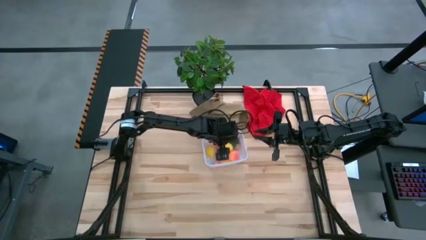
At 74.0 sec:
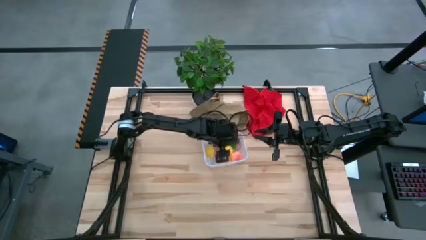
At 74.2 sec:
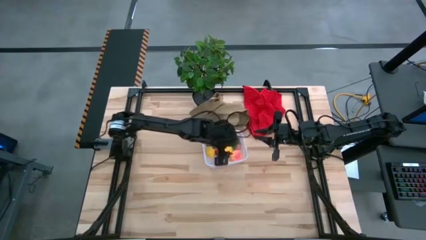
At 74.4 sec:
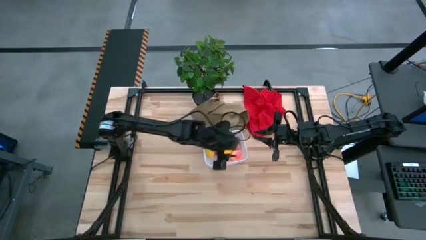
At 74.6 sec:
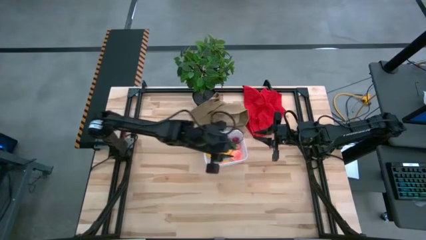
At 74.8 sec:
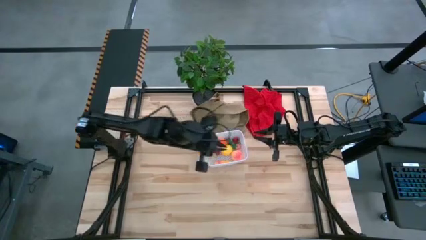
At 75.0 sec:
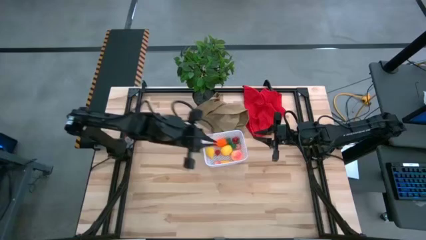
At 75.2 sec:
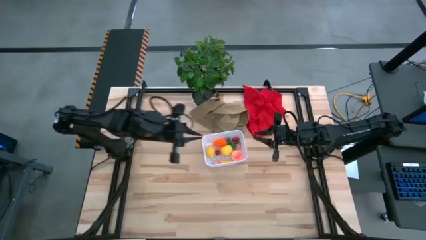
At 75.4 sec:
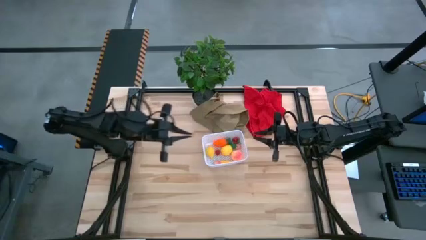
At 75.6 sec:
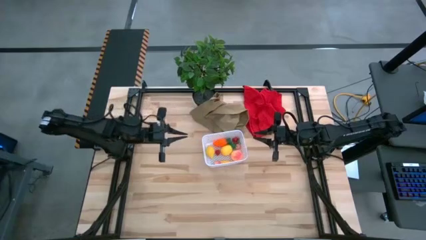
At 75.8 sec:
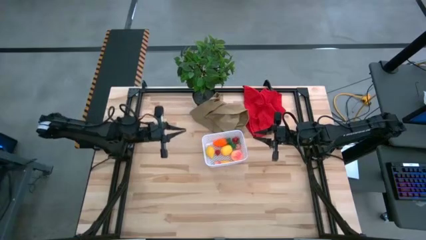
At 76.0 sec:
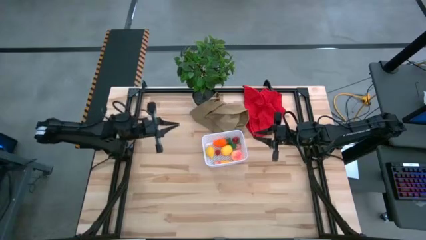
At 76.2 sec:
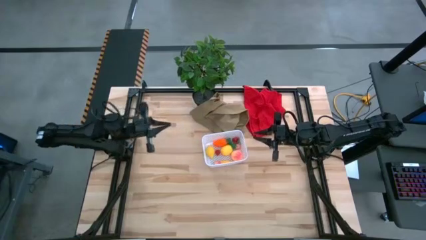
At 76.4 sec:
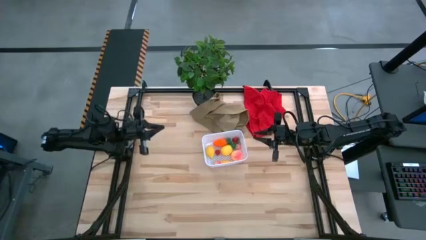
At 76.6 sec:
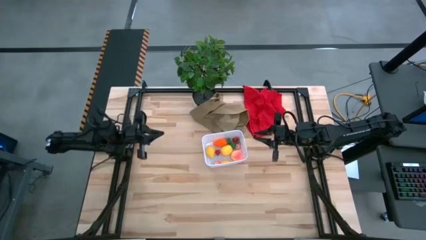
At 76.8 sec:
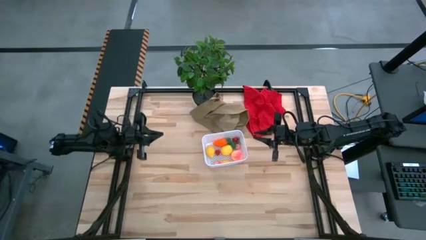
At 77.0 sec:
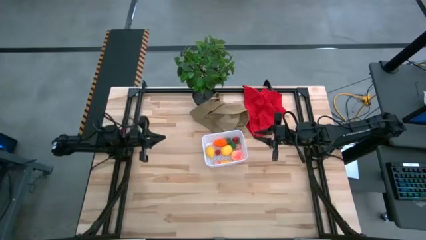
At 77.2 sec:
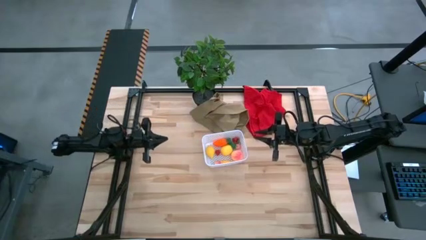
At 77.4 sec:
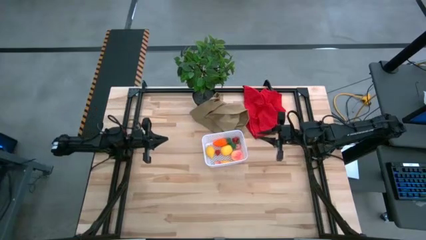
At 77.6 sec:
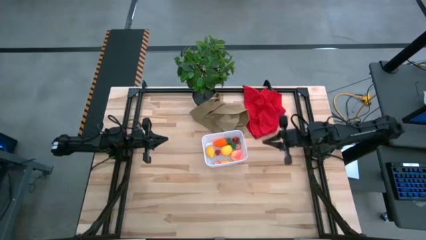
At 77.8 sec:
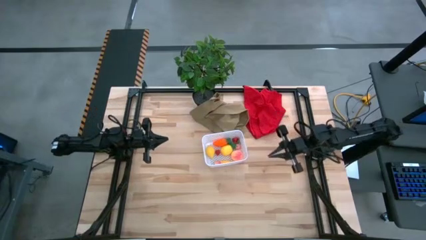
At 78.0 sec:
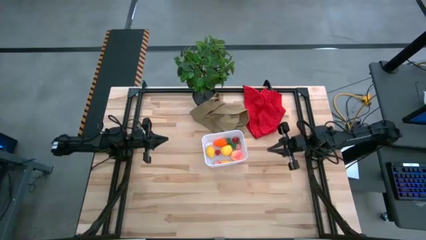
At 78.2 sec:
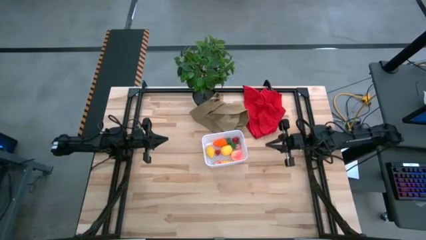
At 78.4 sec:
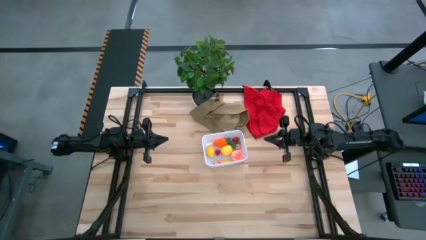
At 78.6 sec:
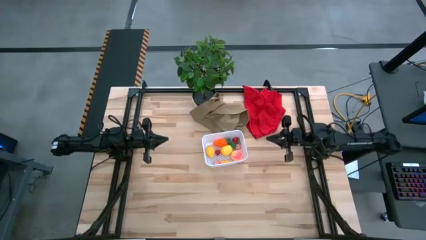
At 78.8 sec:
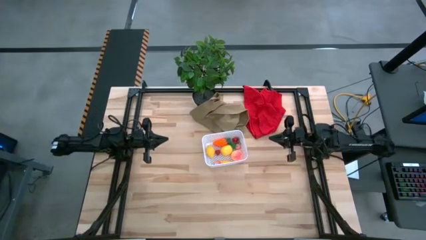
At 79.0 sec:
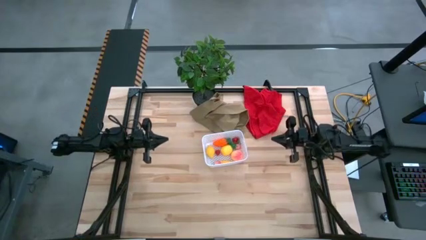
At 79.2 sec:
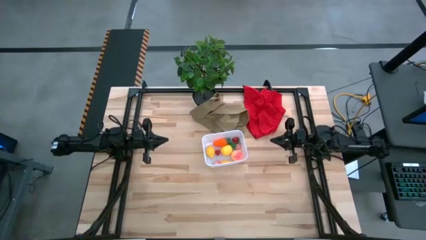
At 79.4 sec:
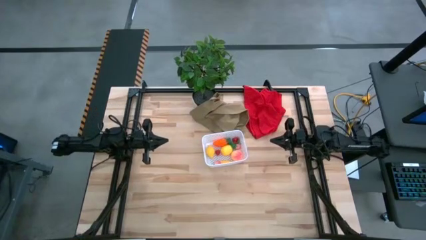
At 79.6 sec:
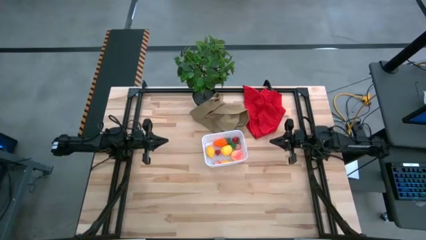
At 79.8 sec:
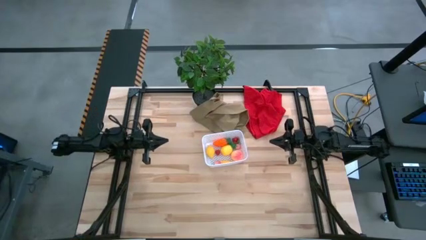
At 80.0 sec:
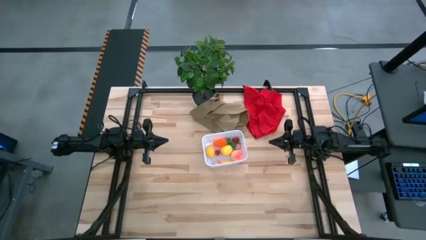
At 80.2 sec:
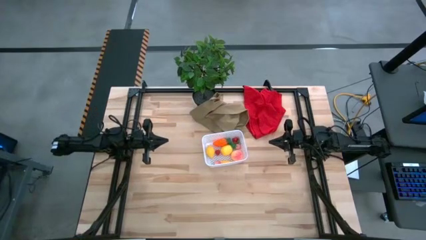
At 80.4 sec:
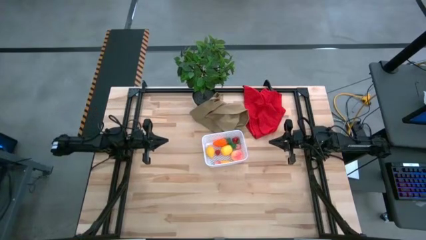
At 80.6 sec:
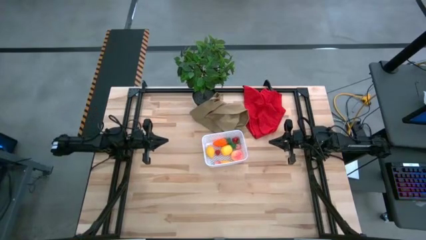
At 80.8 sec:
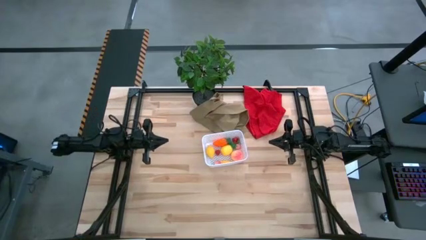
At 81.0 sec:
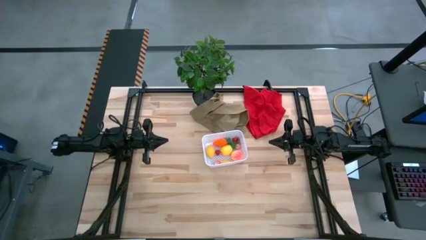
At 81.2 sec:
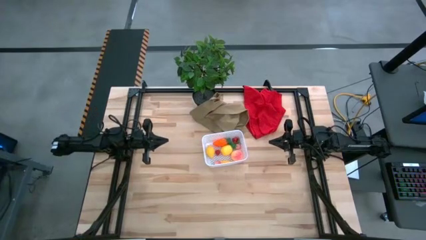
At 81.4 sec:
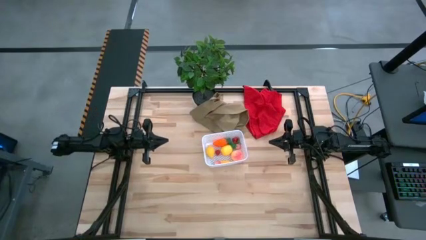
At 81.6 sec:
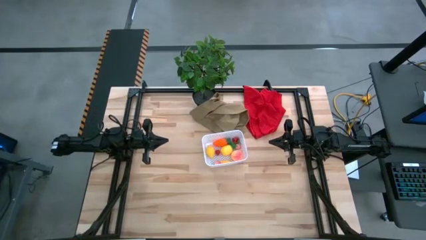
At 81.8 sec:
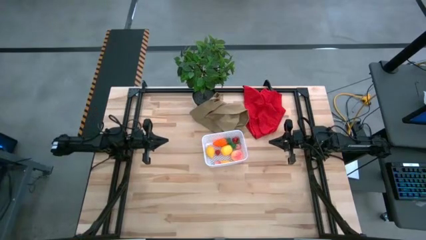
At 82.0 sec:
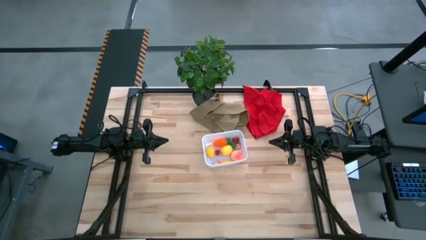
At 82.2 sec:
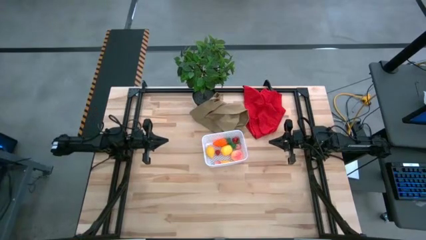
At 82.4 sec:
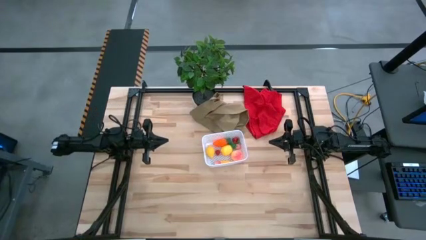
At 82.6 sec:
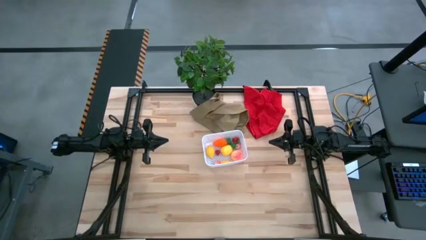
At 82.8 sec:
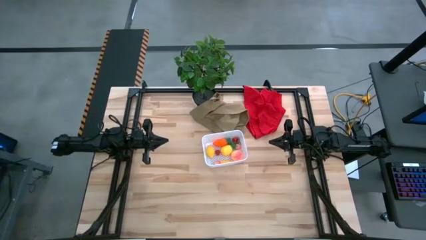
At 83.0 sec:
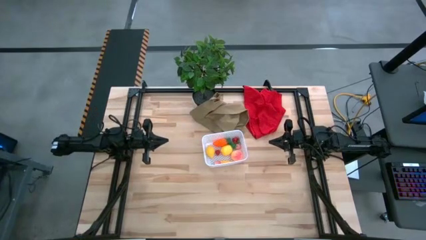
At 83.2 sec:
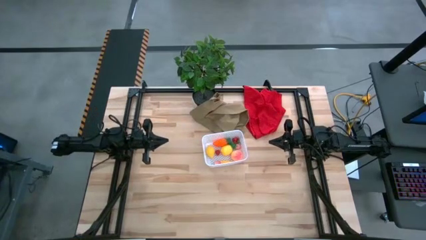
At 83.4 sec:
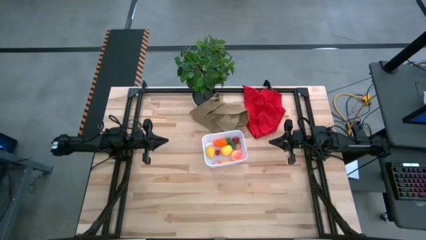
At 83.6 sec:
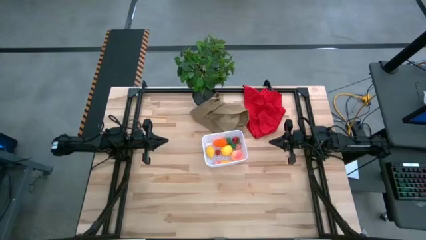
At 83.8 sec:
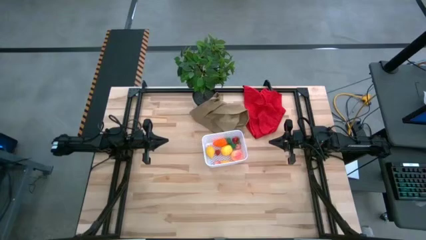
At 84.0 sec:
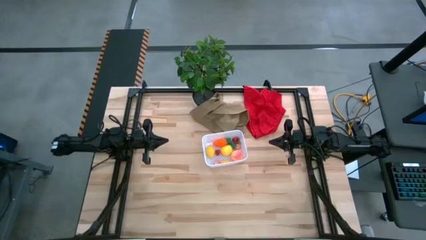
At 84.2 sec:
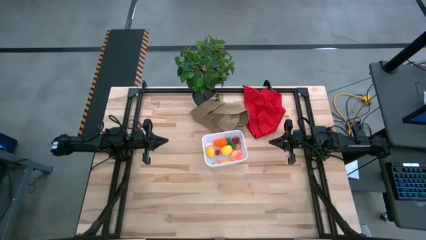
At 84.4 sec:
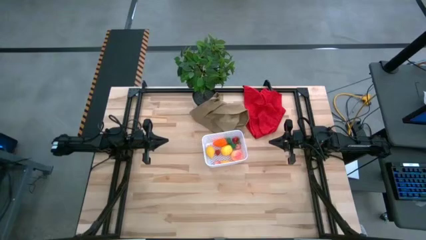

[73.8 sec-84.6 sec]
Task: Pick and placing Produce into tupperware
Return to Home Position

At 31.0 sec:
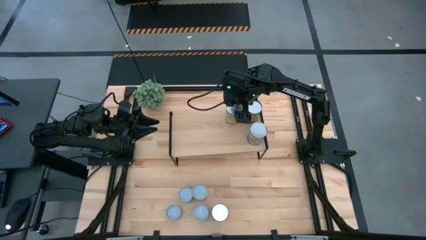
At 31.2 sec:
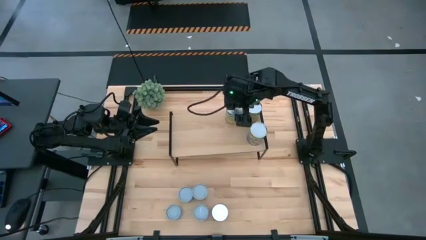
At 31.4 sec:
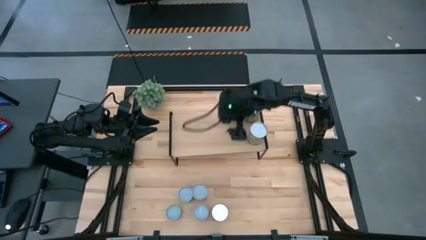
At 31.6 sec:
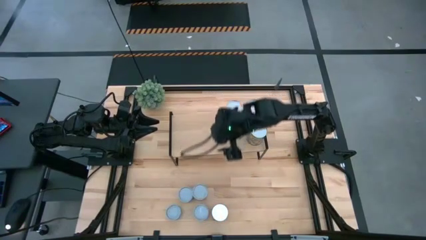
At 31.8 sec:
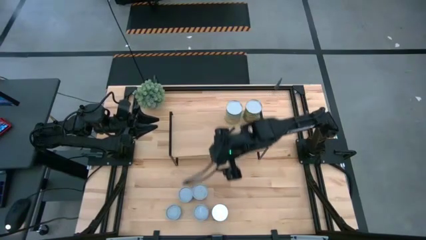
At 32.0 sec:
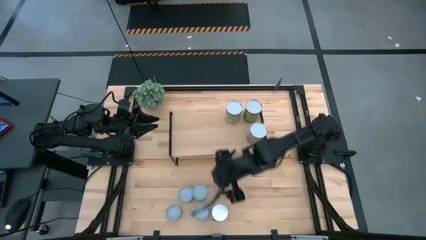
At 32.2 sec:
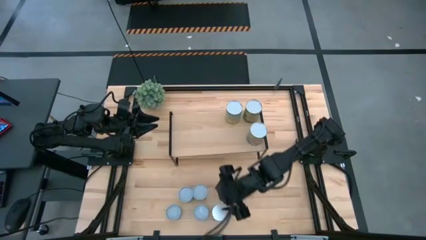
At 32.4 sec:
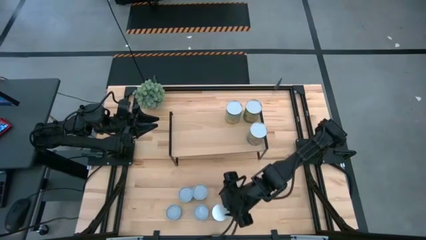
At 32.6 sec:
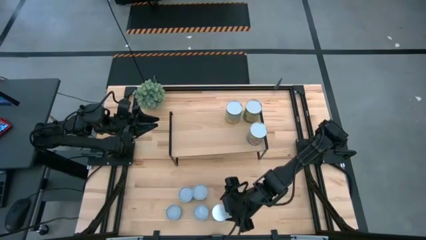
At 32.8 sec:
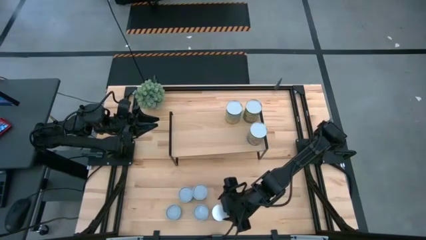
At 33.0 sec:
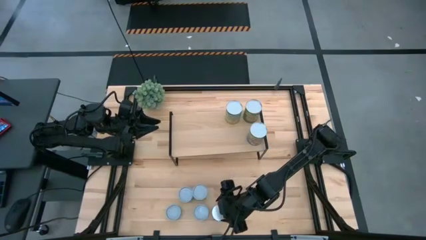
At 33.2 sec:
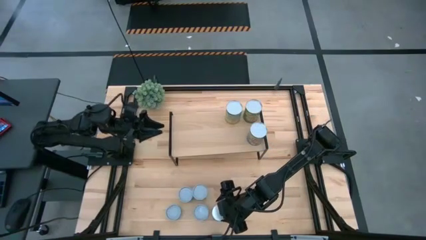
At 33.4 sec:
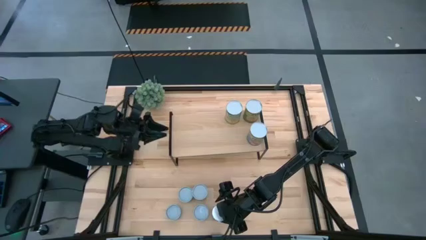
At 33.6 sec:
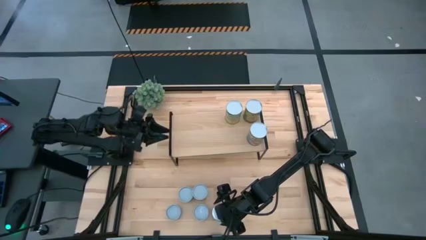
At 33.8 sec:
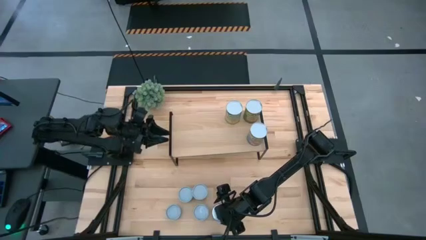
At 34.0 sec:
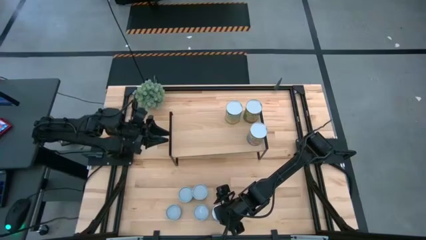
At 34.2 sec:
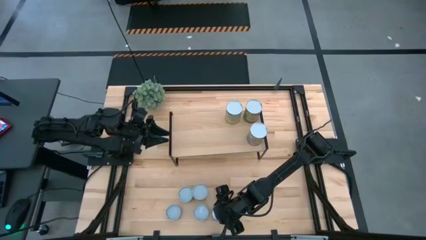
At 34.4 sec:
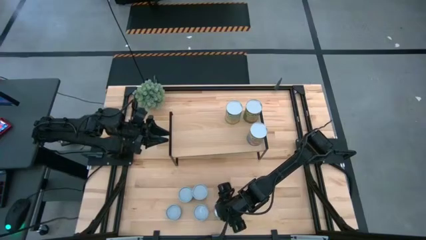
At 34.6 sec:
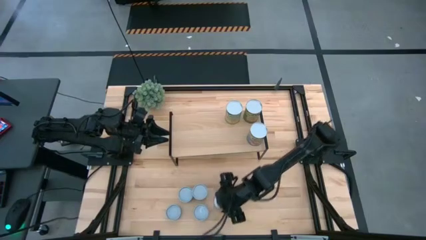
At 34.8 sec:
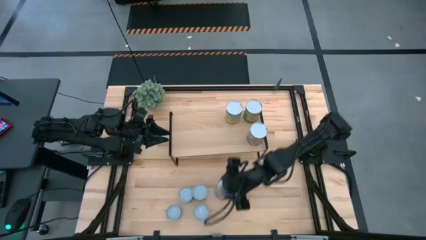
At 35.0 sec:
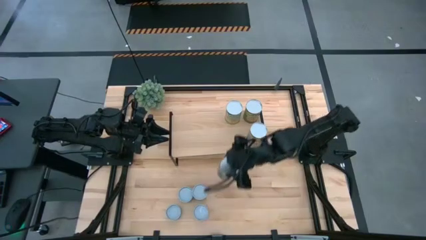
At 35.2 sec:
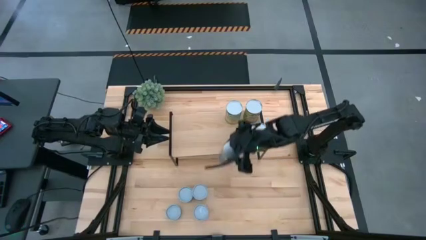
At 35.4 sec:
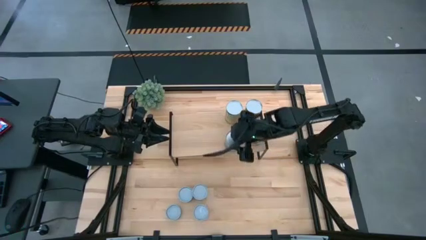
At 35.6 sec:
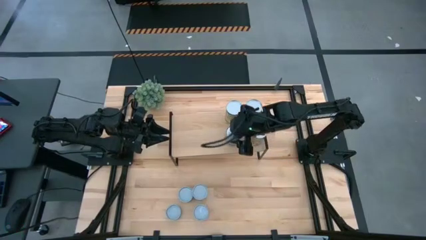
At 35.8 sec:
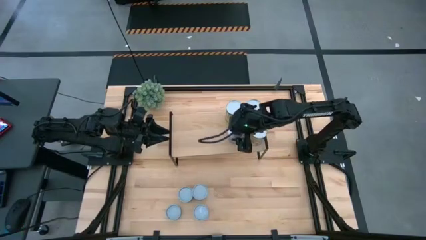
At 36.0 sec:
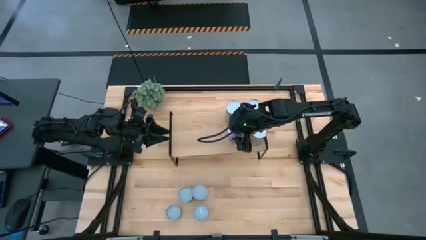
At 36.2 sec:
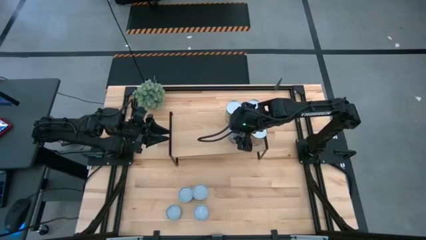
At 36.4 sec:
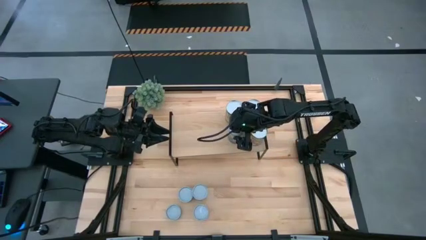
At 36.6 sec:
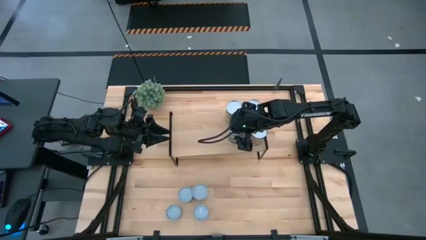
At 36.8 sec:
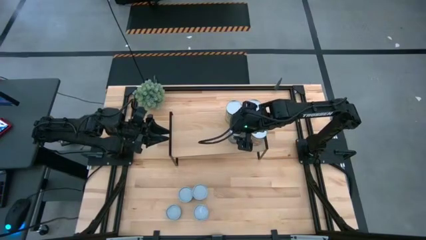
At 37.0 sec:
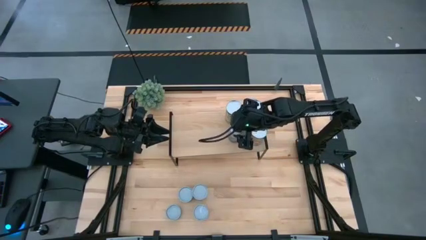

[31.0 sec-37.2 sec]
Task: Pick and place cans onto a shelf
Put the dark blue can on the shelf aligned with the light blue can
